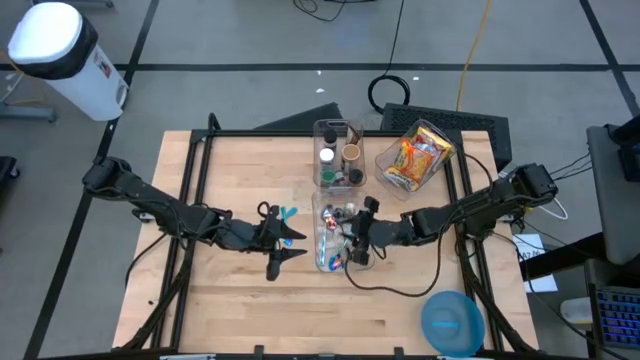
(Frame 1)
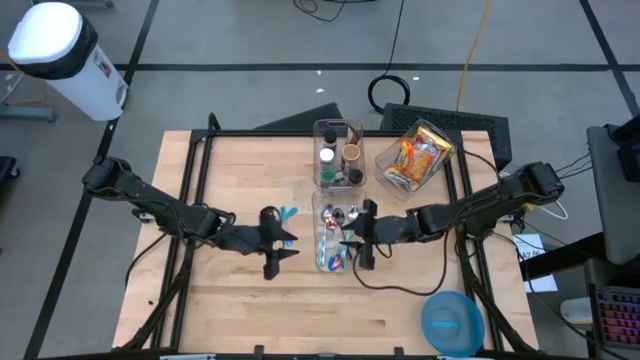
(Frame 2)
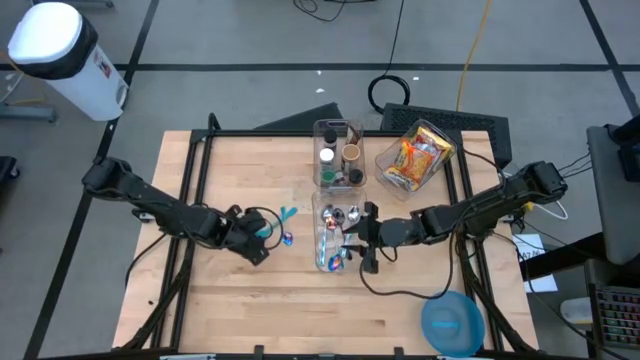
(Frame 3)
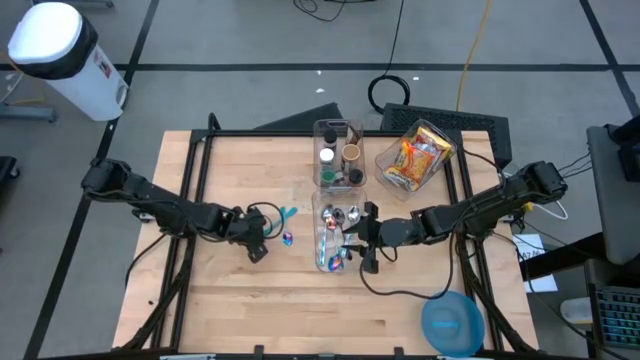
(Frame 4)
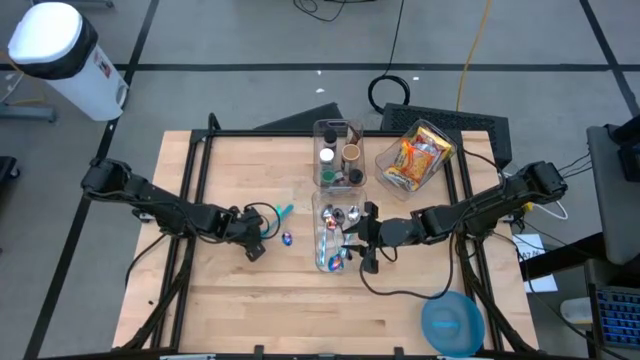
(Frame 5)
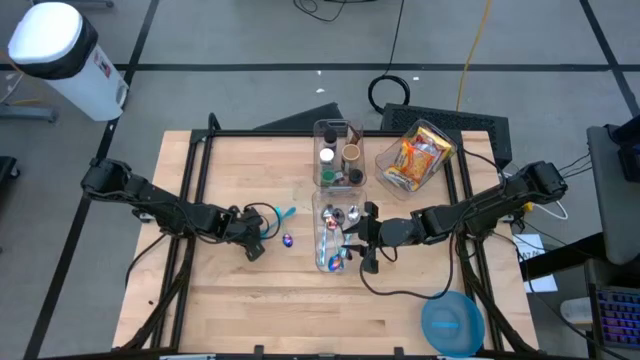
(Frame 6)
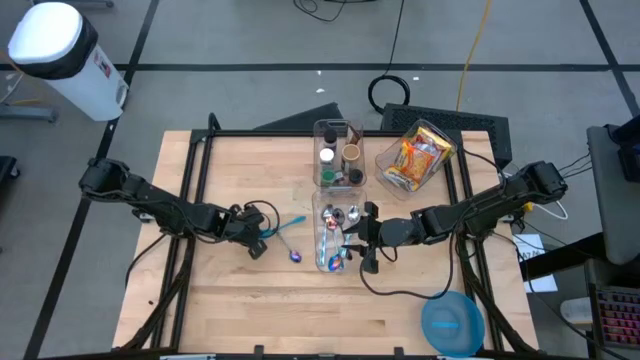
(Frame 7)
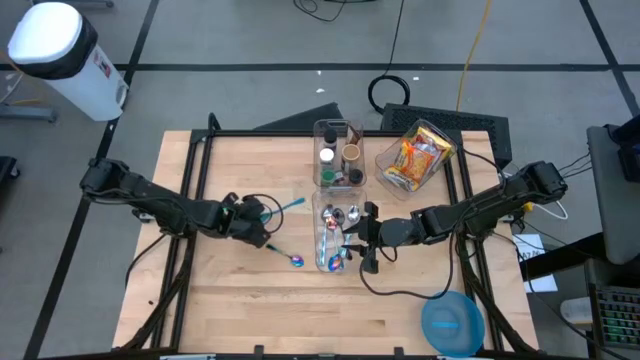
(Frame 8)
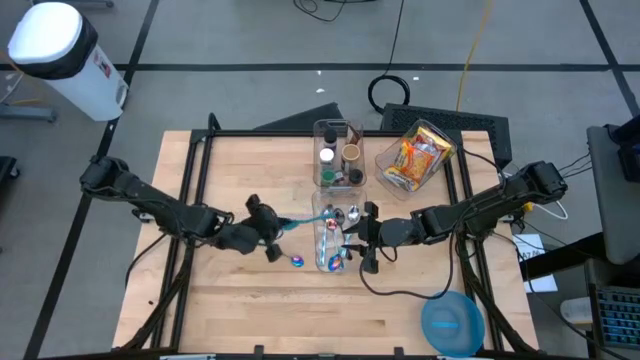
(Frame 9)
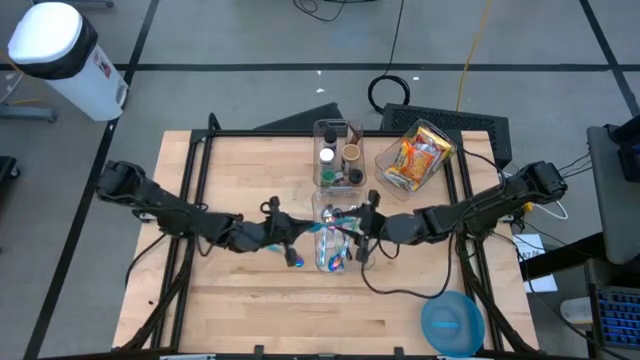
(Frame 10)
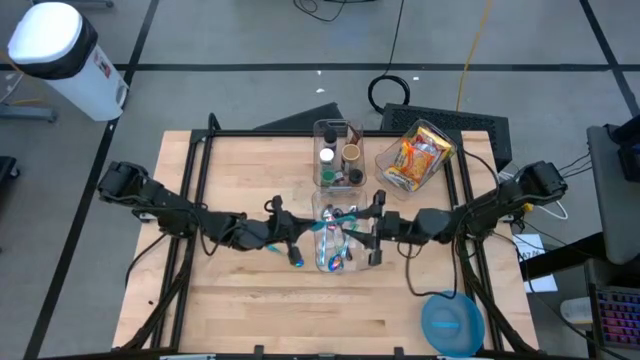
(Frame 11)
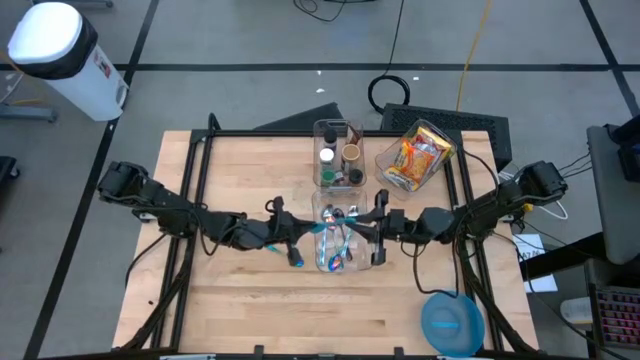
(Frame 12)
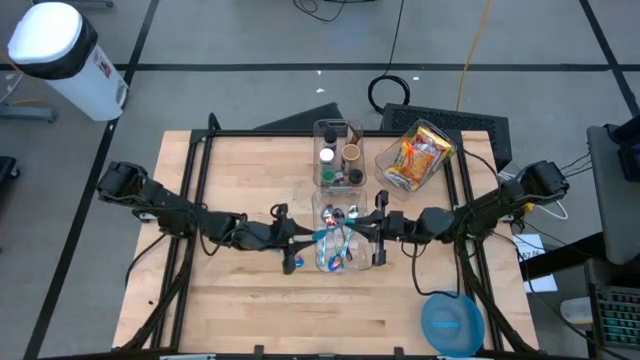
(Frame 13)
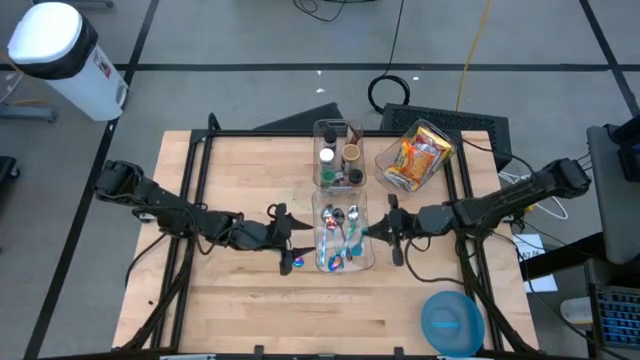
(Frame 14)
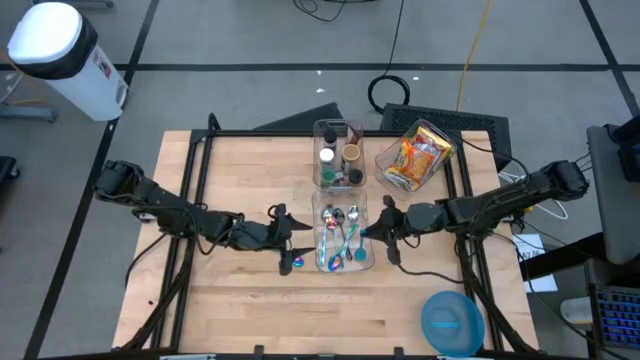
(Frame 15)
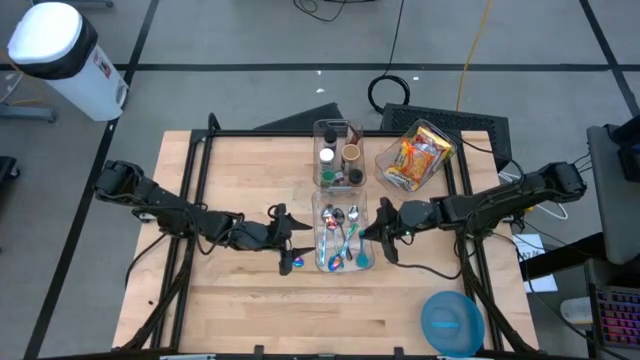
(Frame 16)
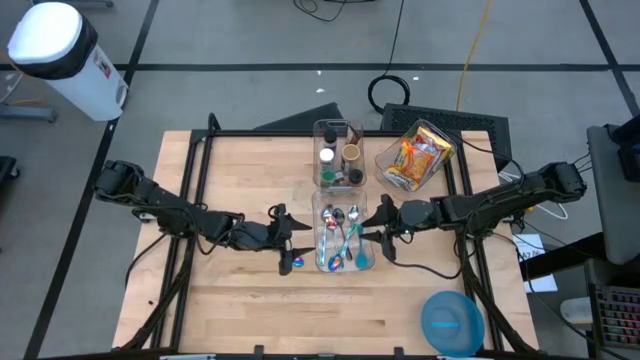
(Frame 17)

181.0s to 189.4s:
Task: Pick & Place Food Item
Put the blue spoon into the bottom transparent bin

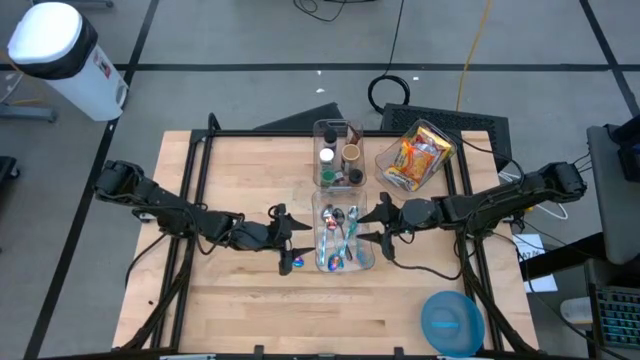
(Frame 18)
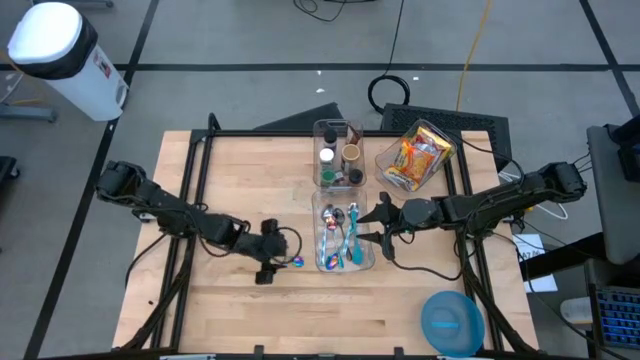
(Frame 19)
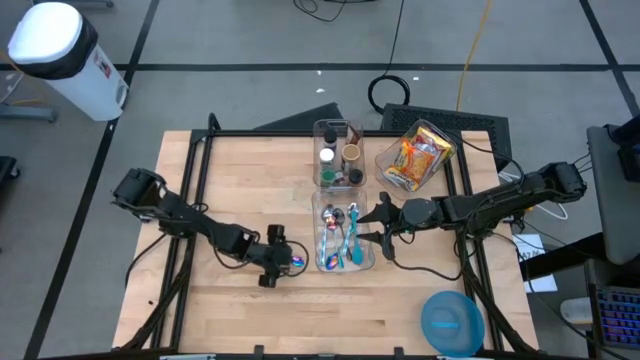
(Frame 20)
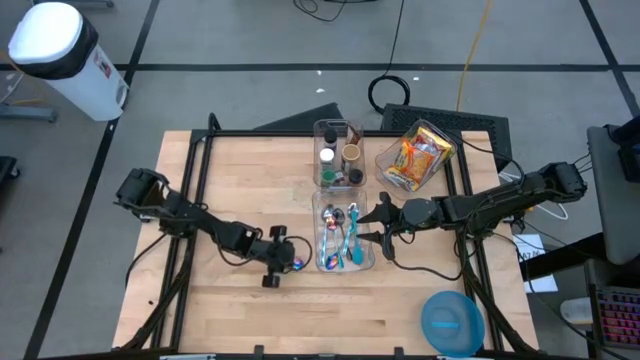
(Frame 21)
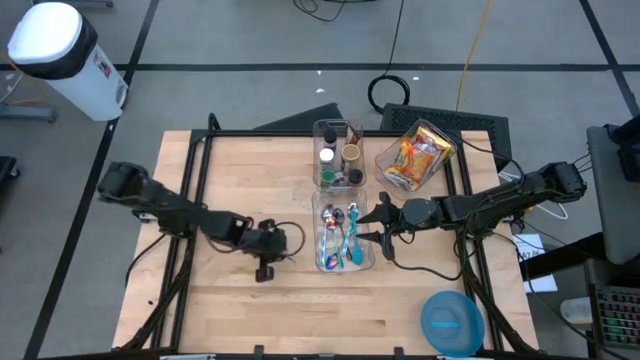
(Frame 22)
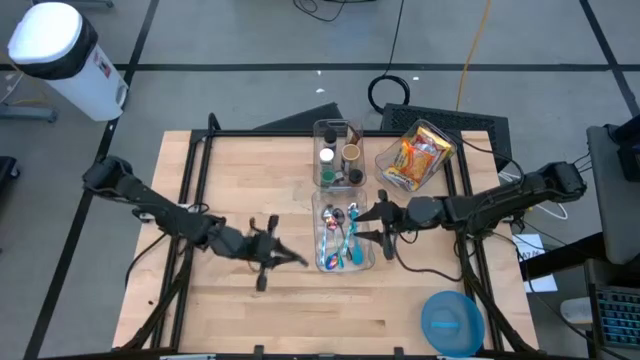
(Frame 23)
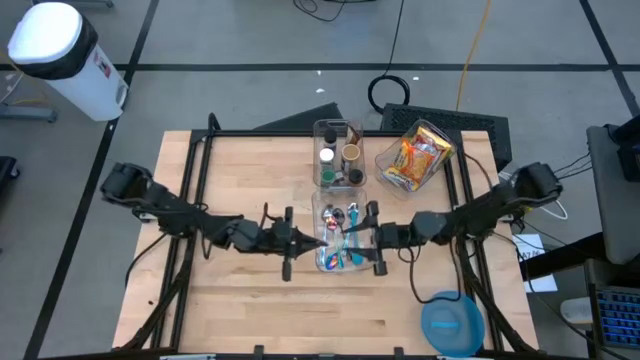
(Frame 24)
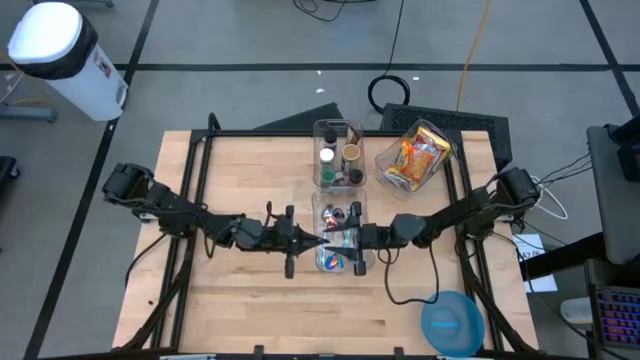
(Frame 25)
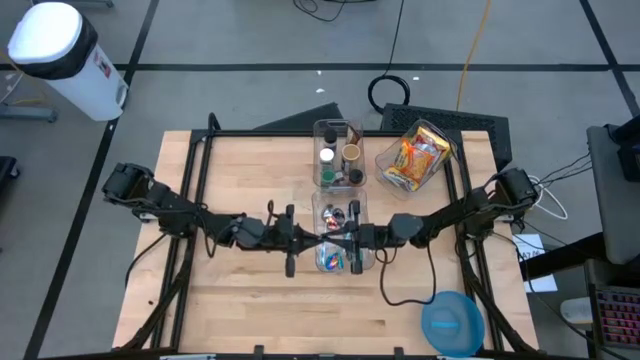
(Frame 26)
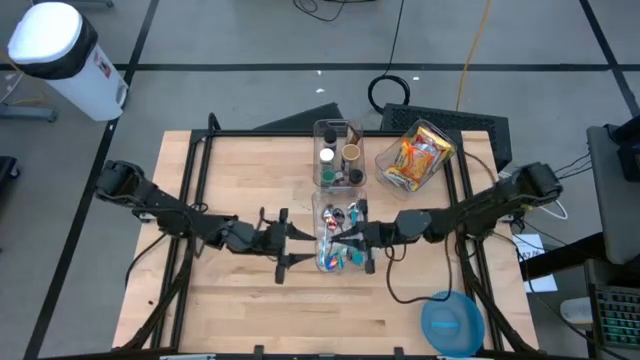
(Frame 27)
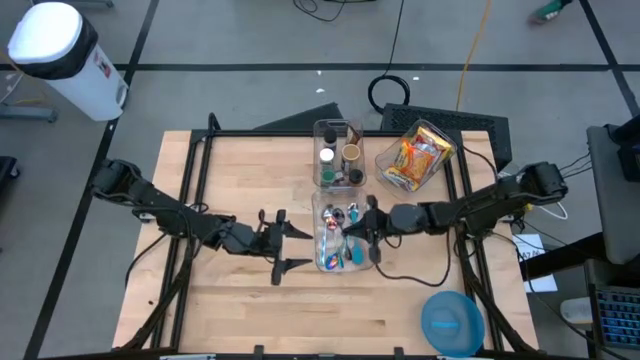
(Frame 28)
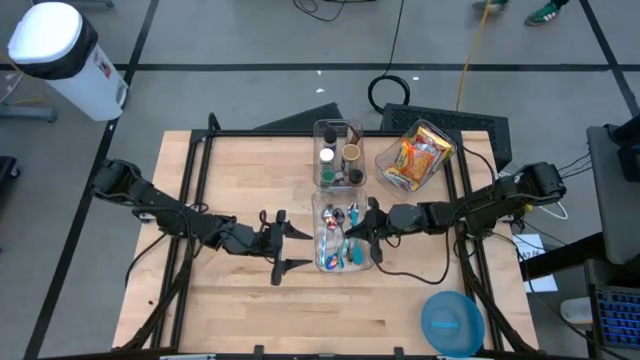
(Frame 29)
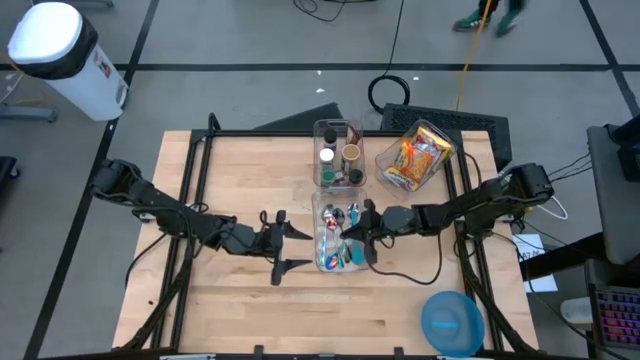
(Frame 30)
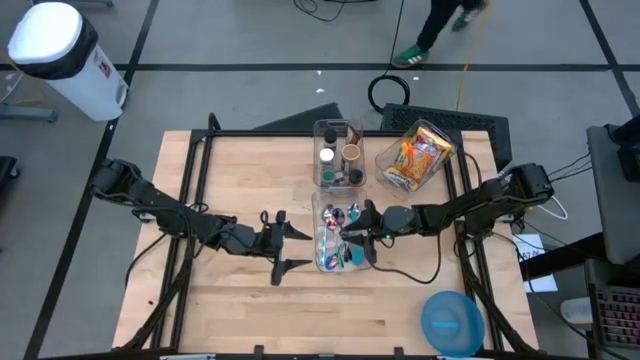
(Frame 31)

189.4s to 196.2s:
Put the rainbow spoon into the bottom transparent bin

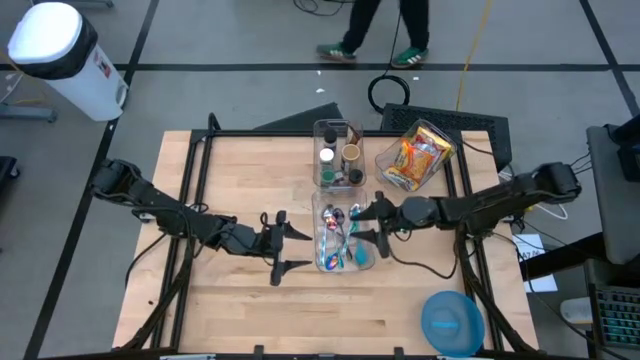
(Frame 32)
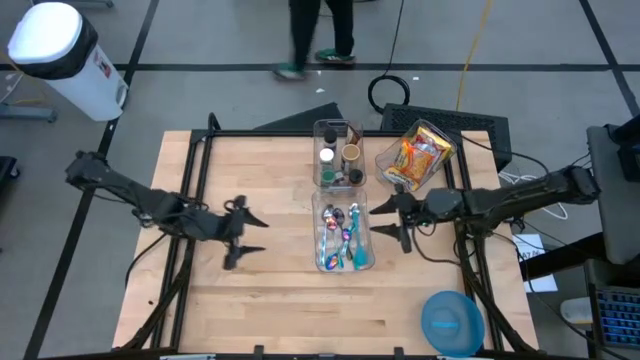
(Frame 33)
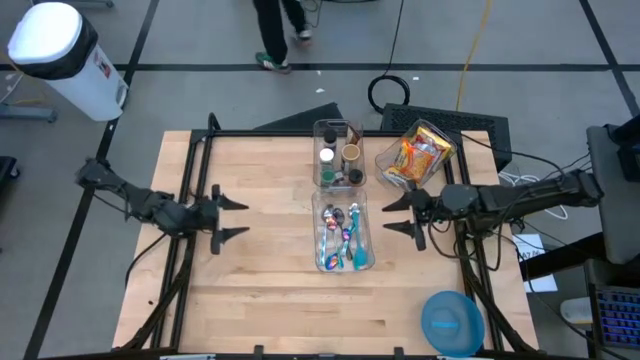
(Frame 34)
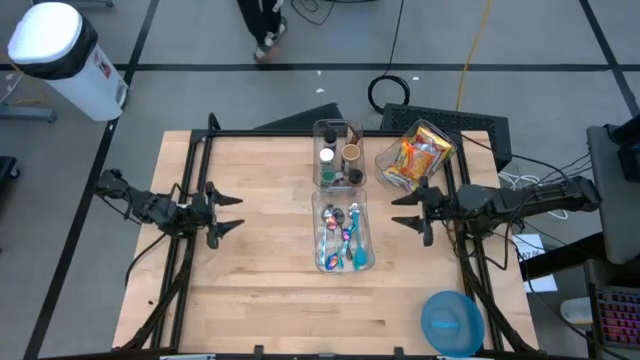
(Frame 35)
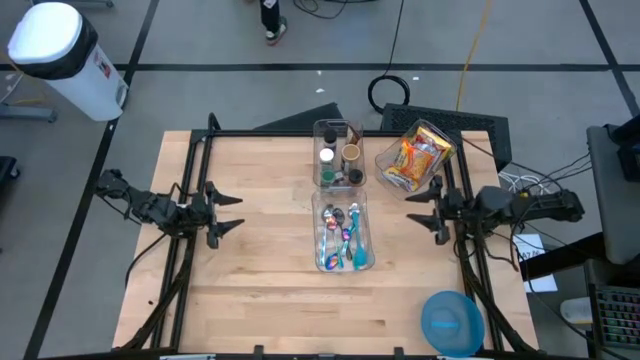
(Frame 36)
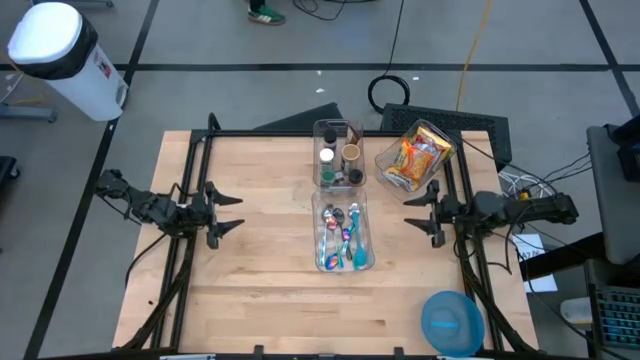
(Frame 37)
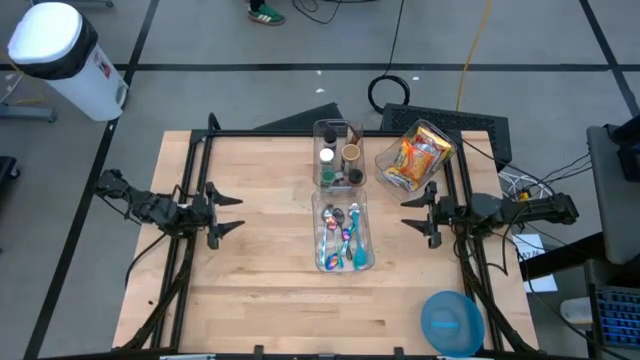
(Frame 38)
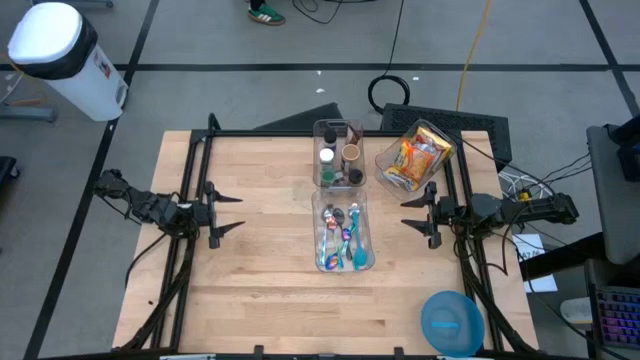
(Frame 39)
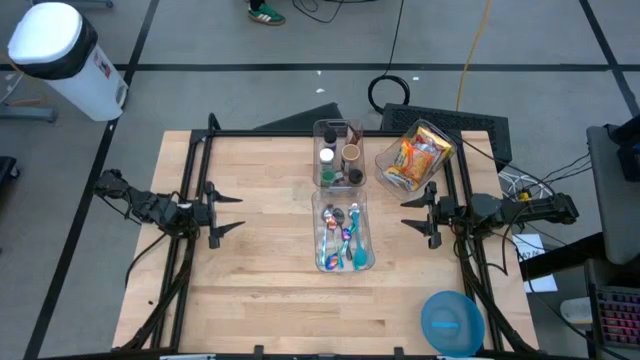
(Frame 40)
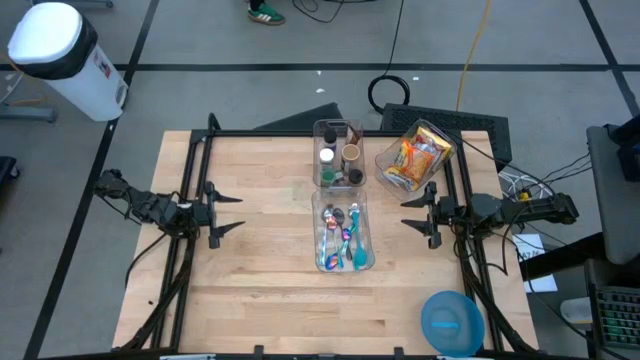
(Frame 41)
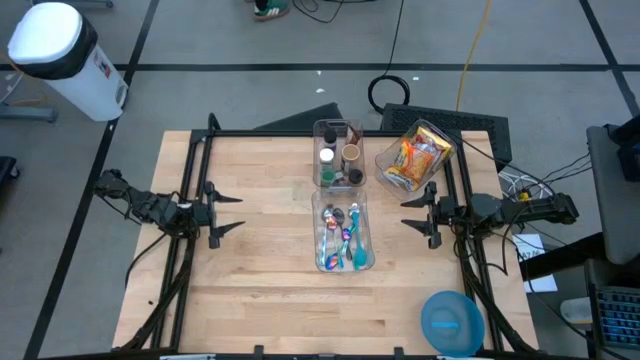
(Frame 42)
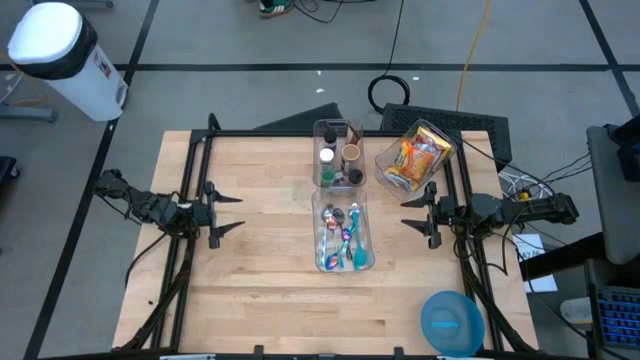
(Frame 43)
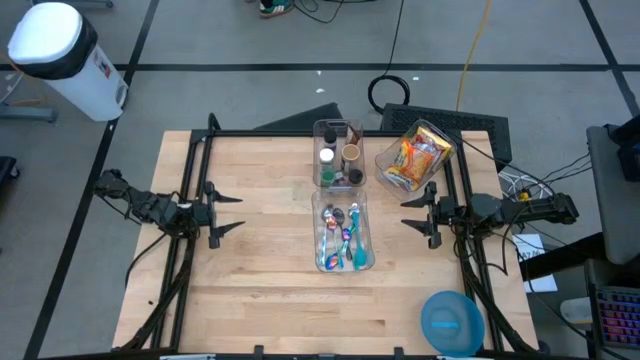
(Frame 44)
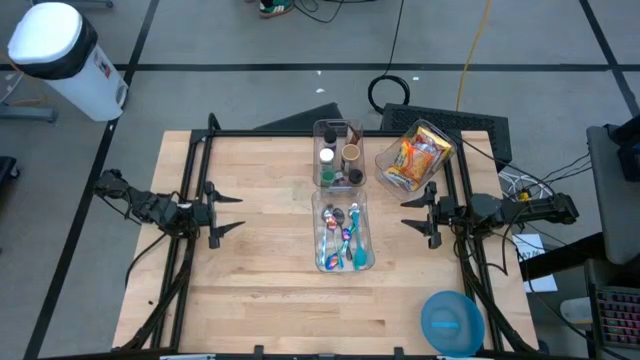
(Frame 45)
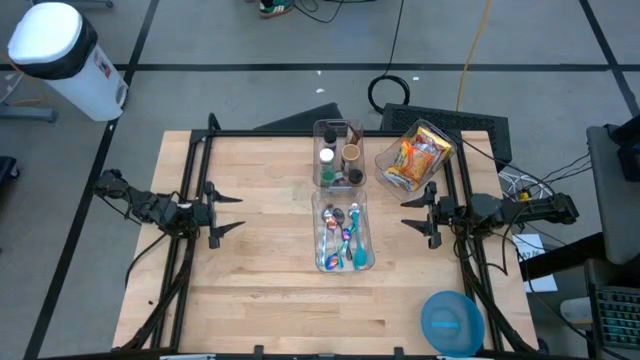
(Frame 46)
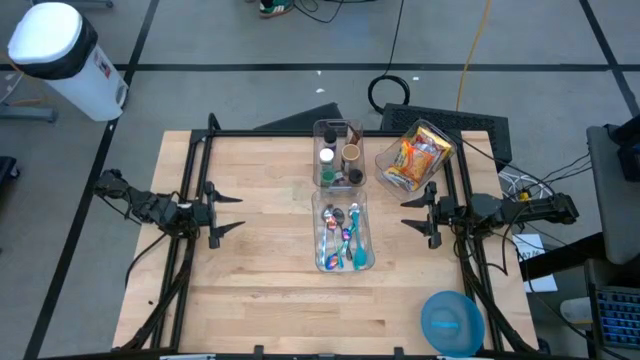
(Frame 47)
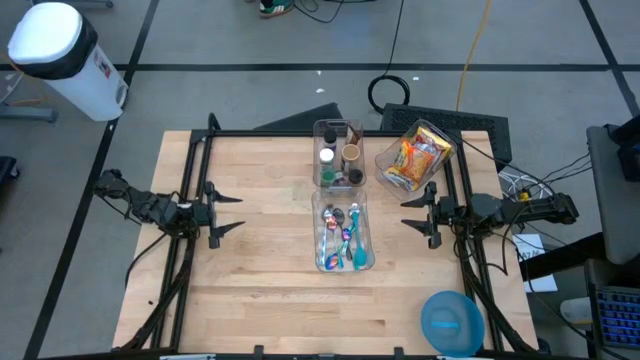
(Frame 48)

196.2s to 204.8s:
Return to Home Position
